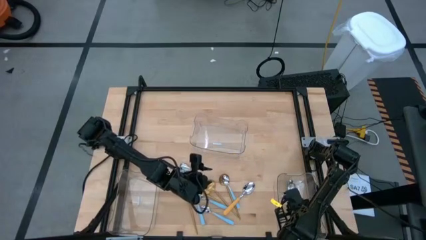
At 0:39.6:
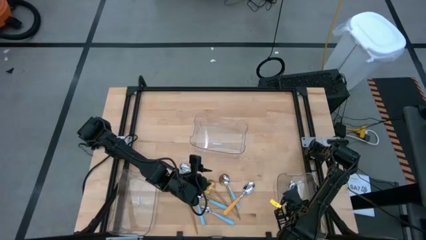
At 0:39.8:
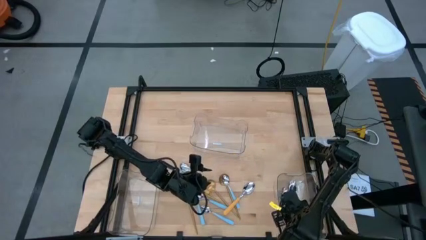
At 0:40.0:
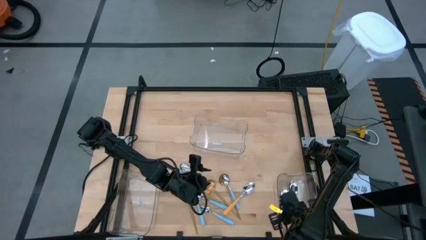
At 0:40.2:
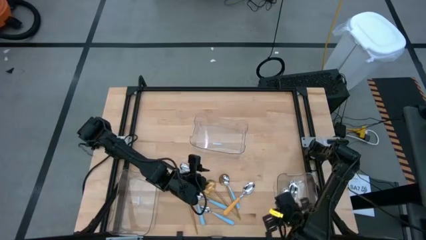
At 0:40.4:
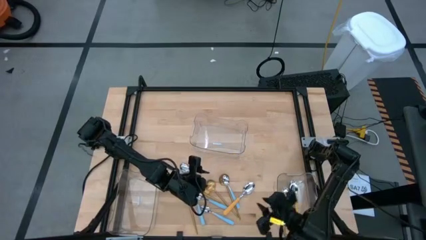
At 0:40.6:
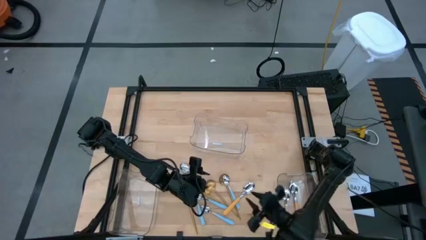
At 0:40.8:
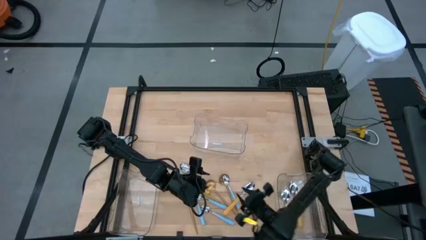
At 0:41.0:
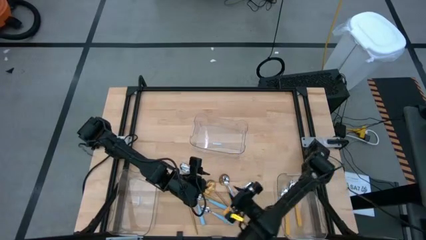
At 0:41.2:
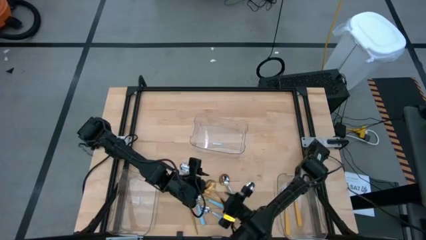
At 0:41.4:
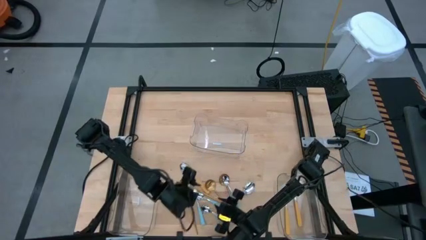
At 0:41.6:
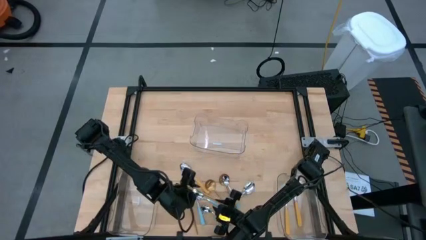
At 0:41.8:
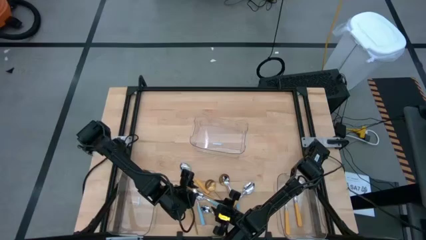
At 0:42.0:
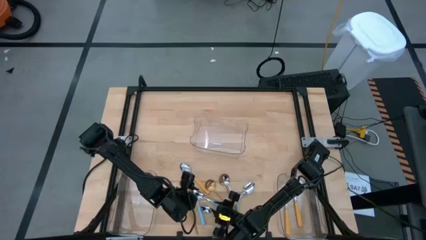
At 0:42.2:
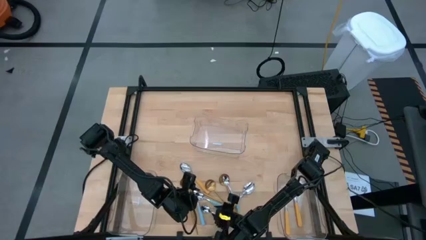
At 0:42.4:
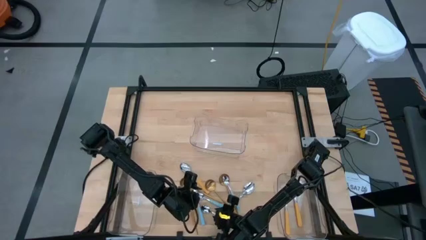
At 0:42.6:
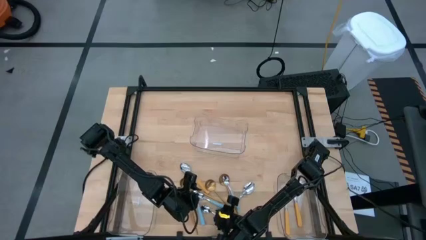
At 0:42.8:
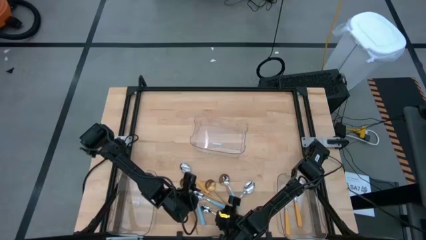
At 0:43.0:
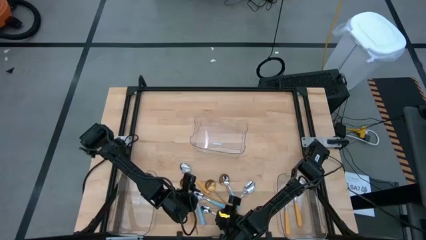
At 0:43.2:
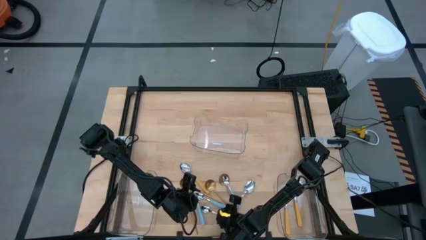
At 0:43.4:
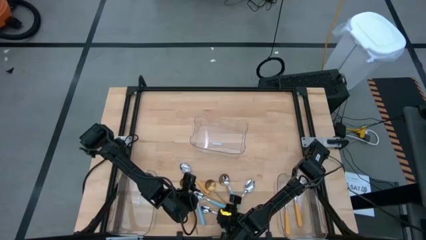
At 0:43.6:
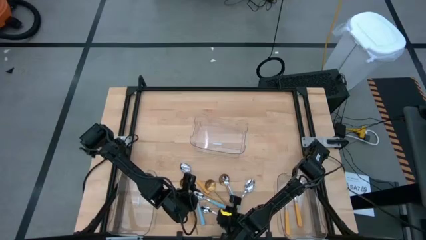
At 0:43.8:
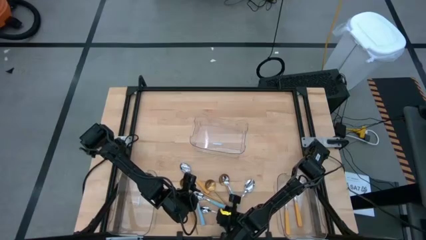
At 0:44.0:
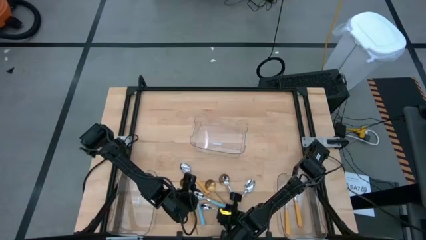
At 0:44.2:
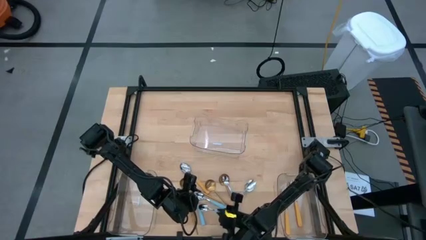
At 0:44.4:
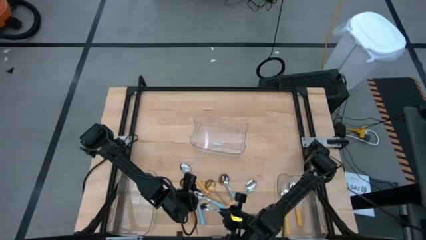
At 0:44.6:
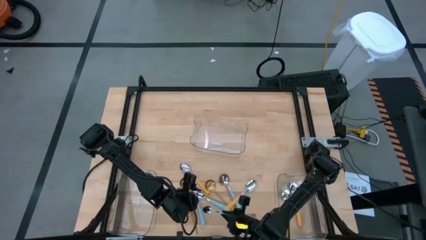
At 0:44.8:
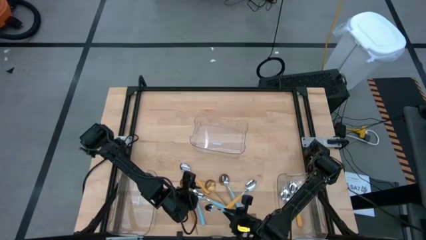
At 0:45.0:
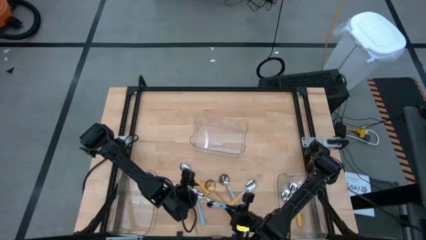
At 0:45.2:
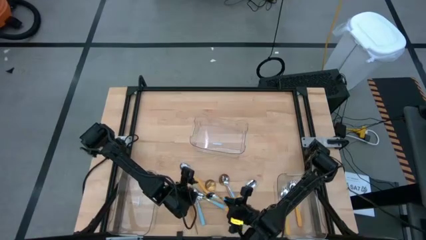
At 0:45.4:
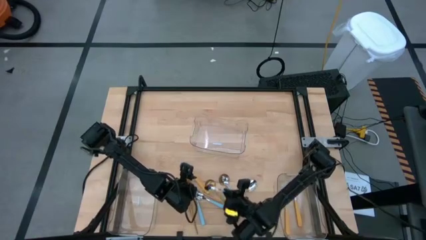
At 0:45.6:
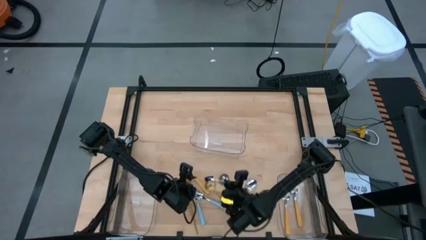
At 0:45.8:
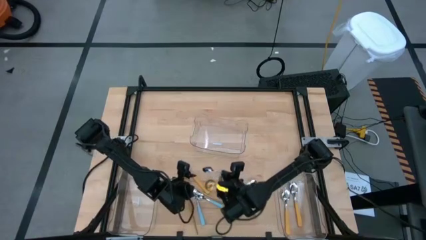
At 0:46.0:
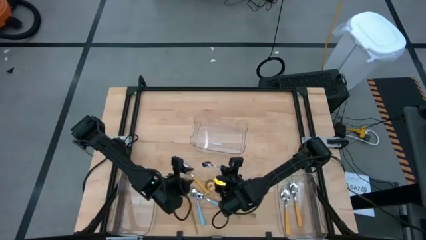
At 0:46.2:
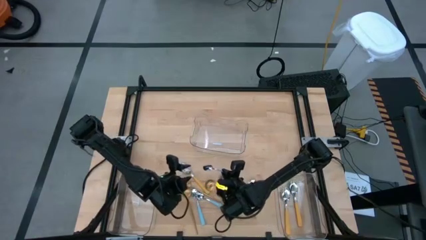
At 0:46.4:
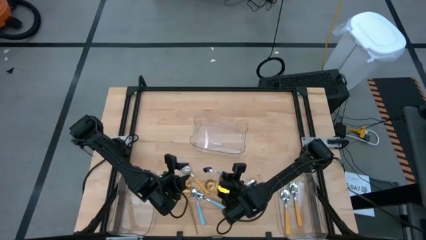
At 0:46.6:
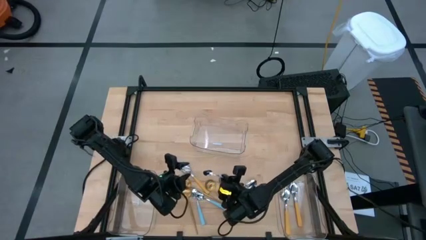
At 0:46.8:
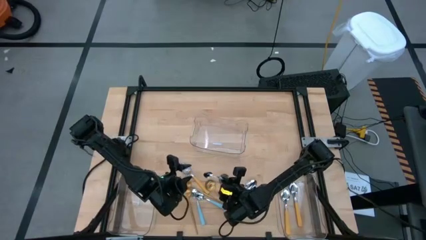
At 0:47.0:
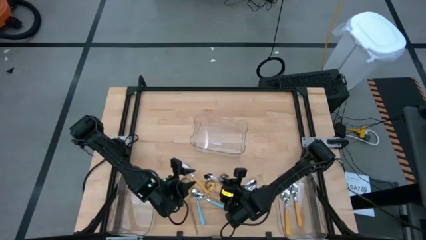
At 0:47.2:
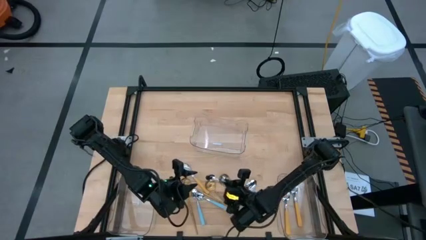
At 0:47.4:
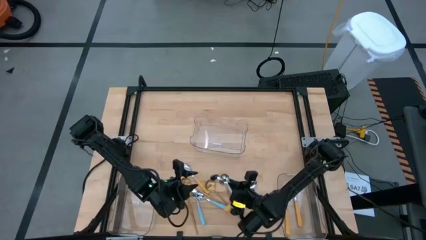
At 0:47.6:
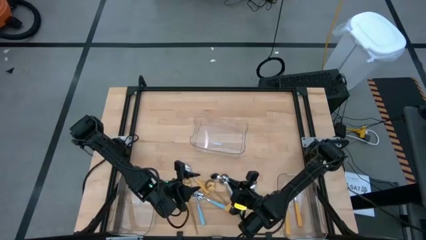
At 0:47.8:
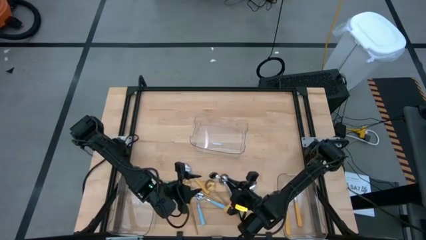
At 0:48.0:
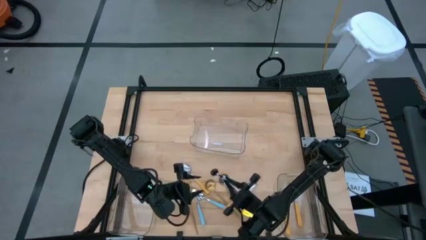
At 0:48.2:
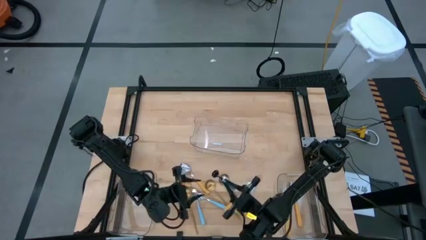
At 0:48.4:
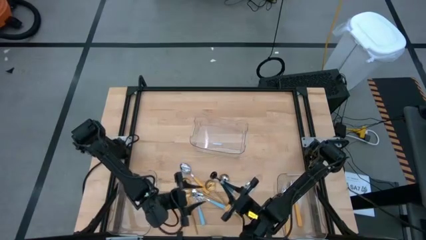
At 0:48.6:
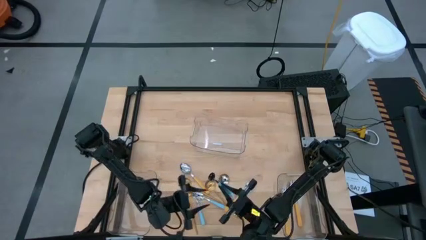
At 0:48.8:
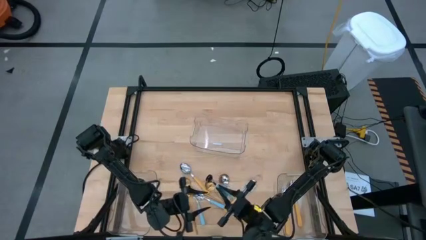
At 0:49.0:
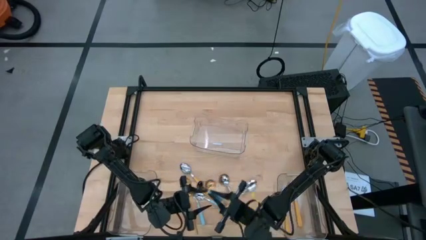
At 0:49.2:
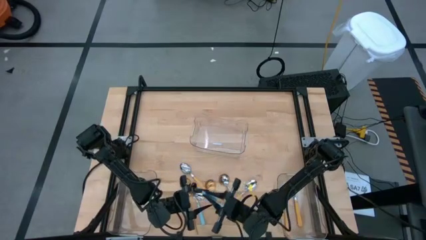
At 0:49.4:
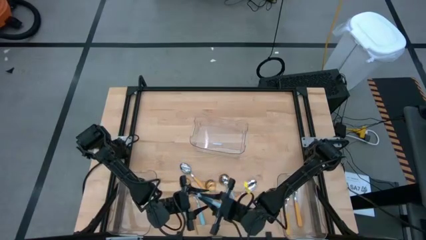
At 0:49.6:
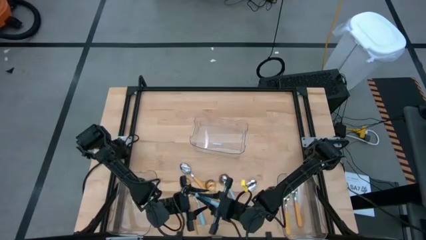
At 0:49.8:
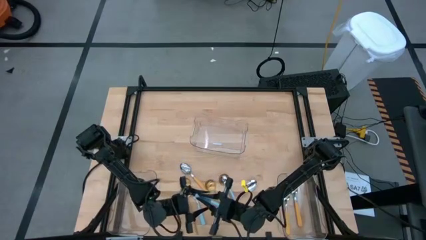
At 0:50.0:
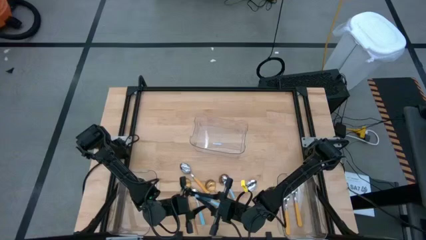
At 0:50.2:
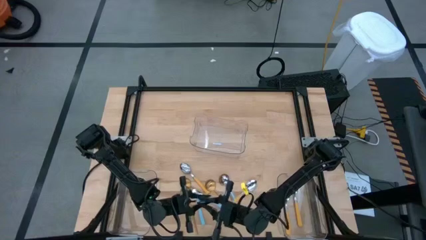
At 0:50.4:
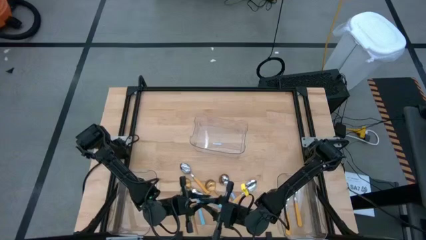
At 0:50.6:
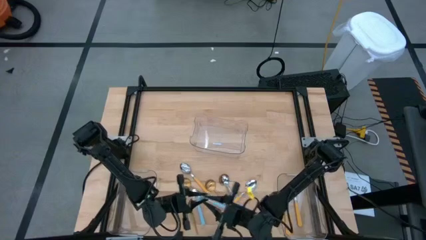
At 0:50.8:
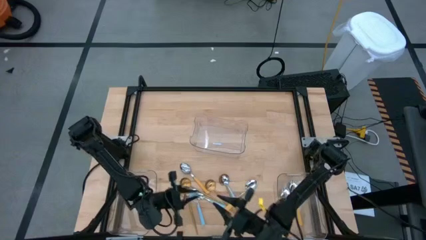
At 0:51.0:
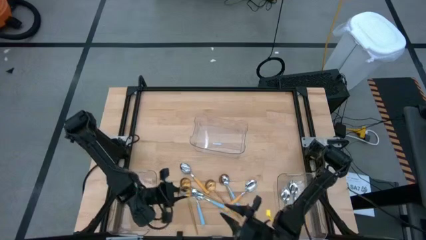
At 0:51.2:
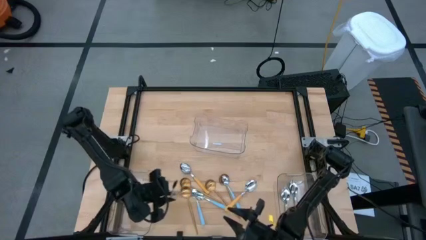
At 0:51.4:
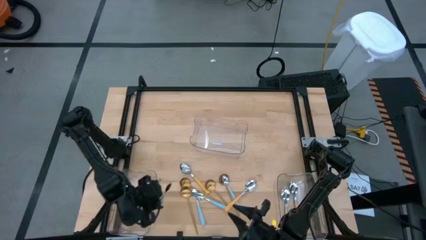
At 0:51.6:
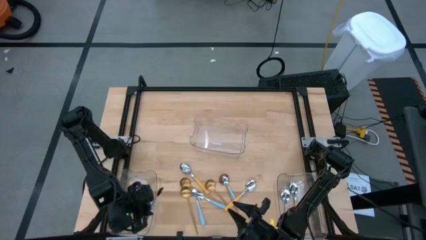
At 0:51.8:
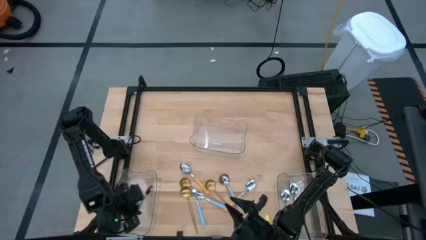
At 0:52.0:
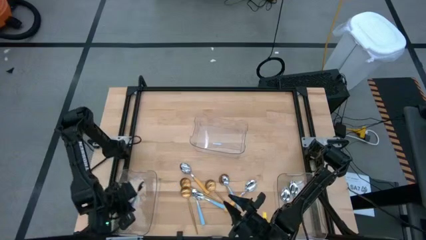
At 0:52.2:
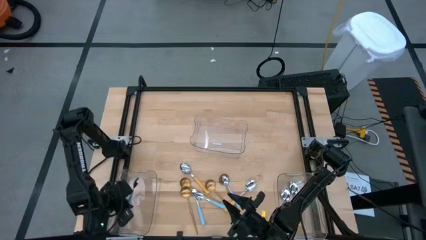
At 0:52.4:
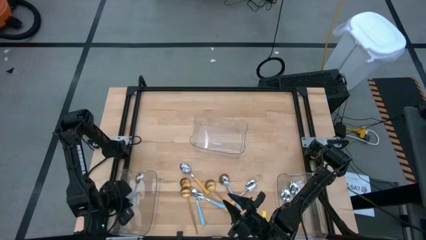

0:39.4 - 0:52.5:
Task: Sort silverware by color (type)
Put the blue spoon into the bottom left transparent bin
